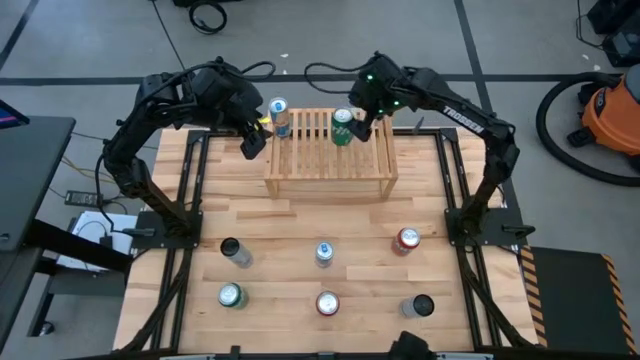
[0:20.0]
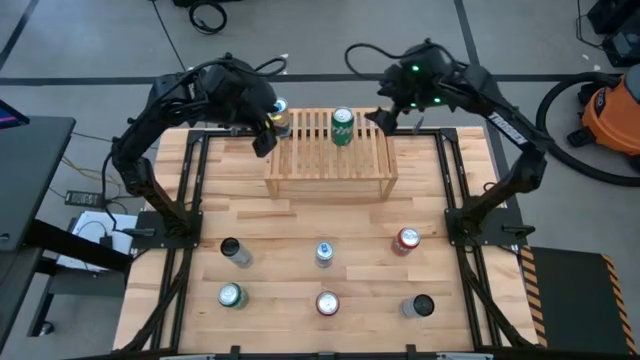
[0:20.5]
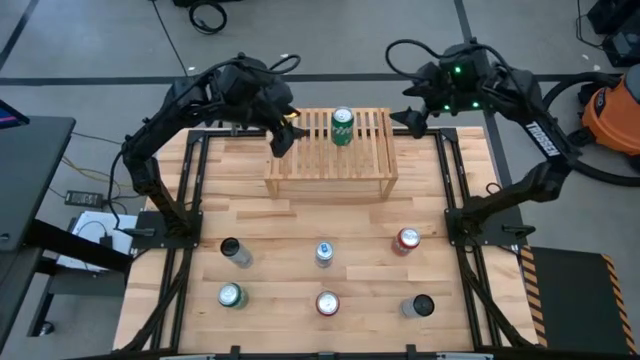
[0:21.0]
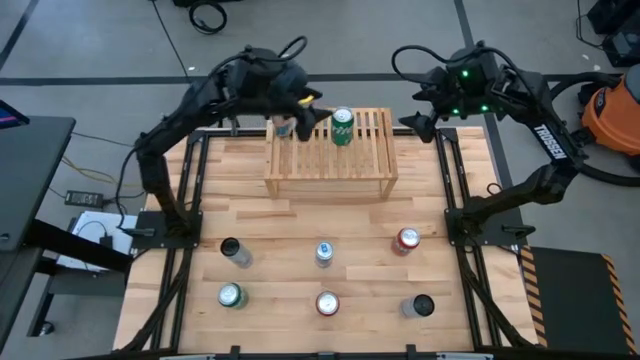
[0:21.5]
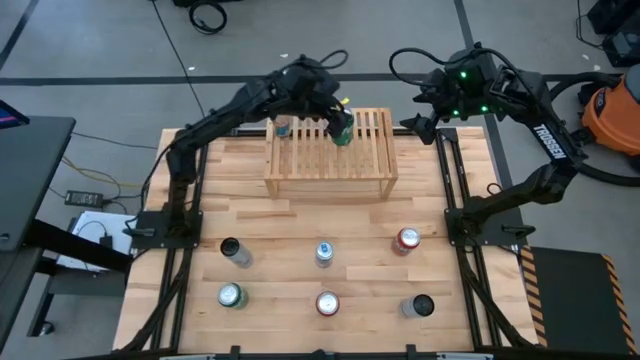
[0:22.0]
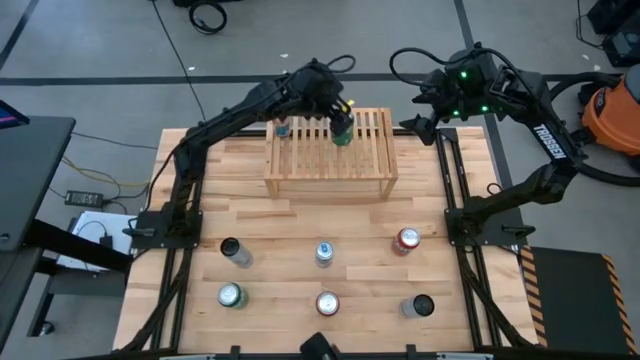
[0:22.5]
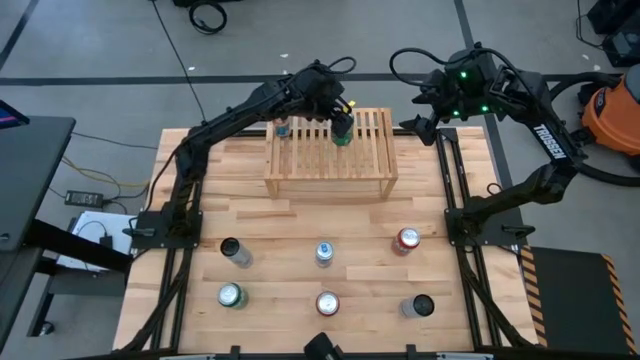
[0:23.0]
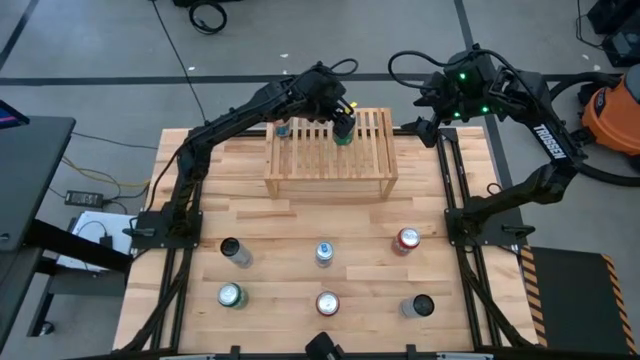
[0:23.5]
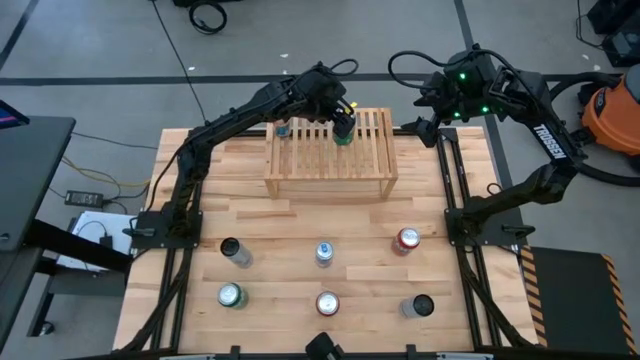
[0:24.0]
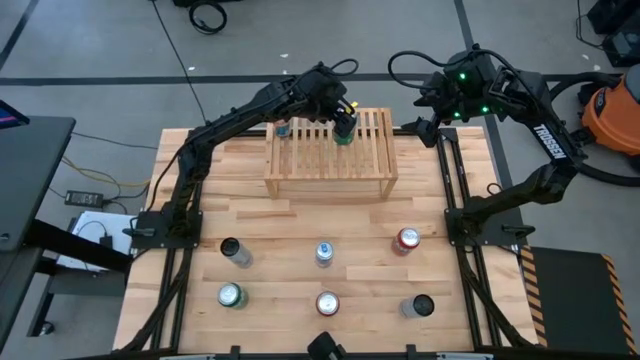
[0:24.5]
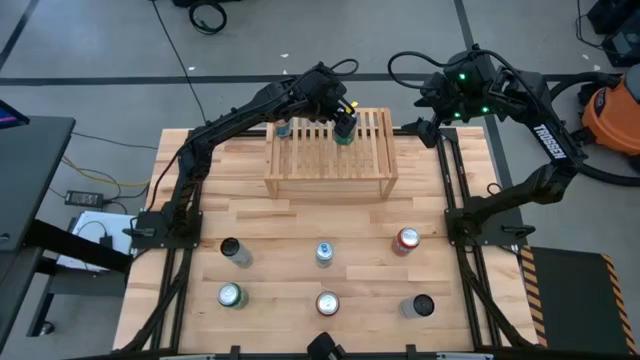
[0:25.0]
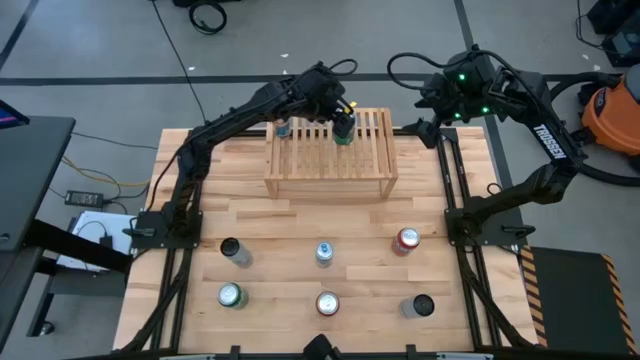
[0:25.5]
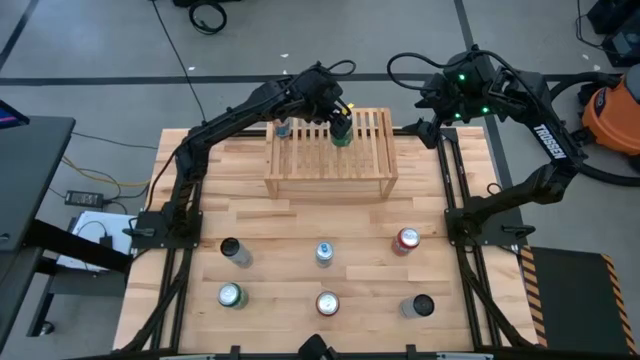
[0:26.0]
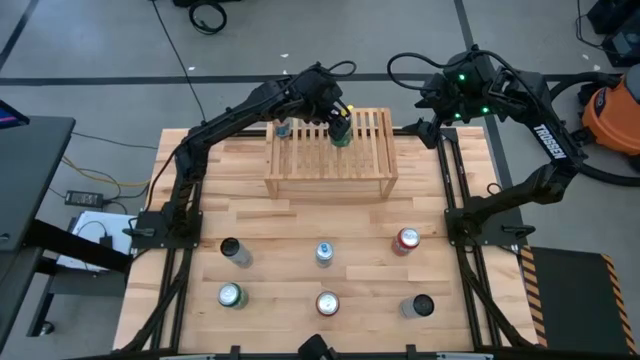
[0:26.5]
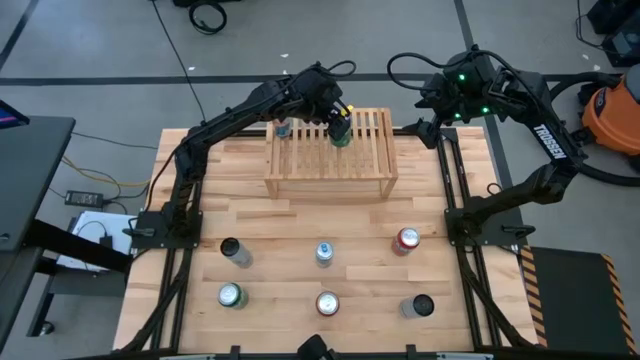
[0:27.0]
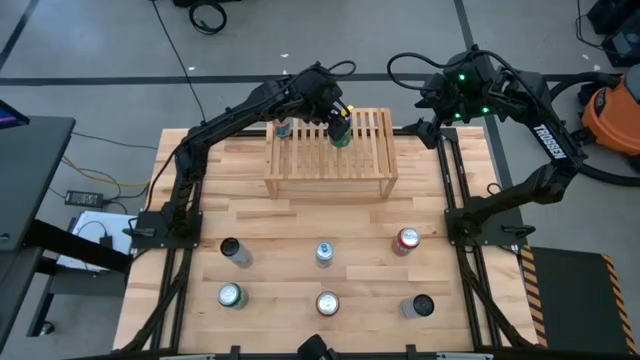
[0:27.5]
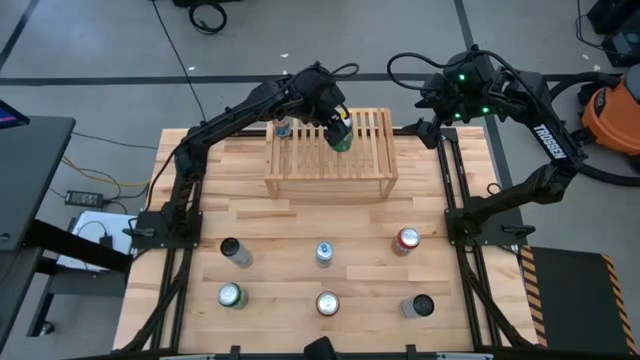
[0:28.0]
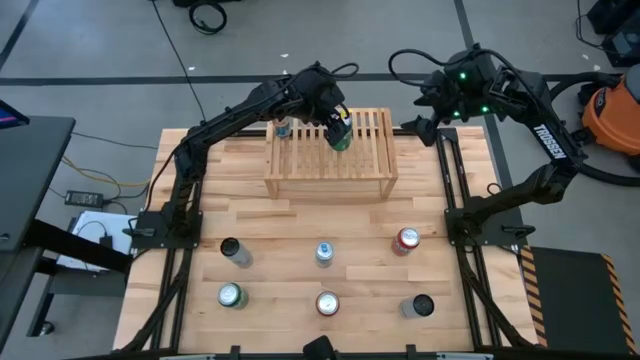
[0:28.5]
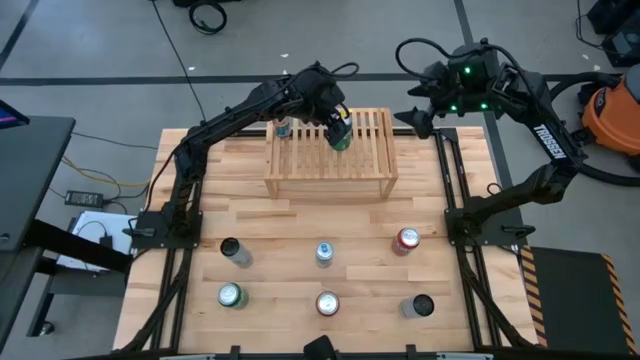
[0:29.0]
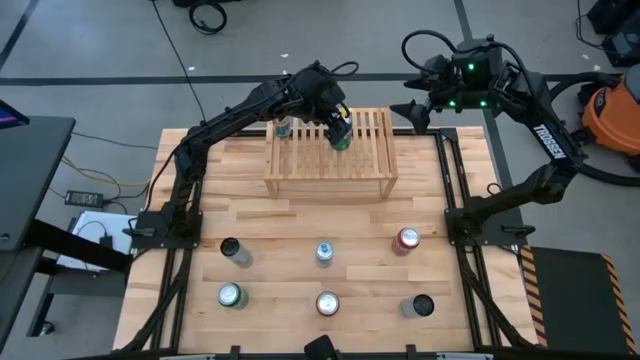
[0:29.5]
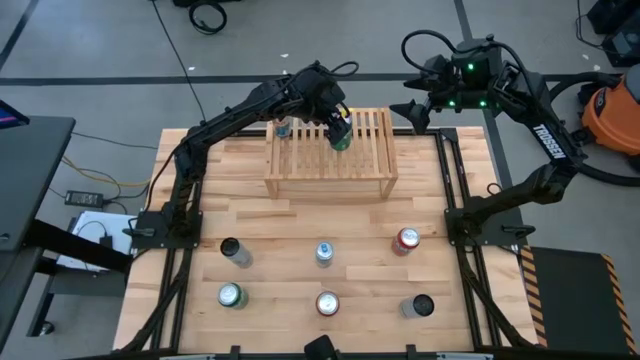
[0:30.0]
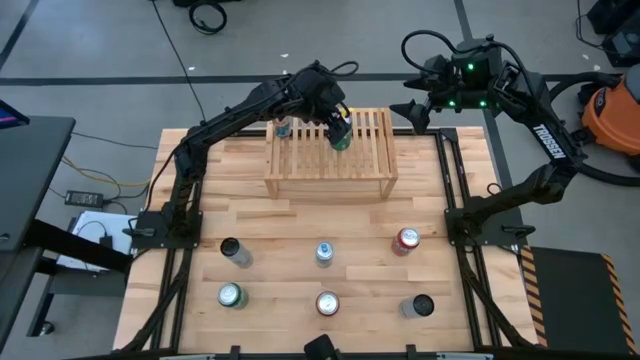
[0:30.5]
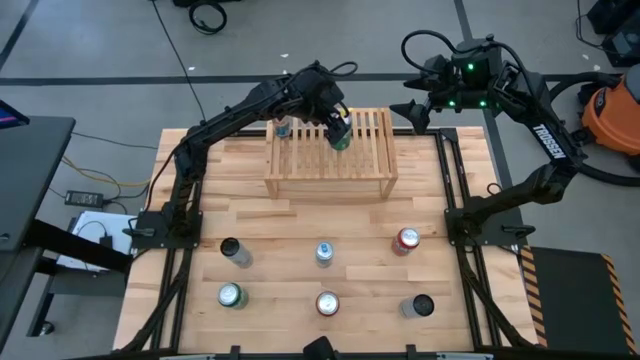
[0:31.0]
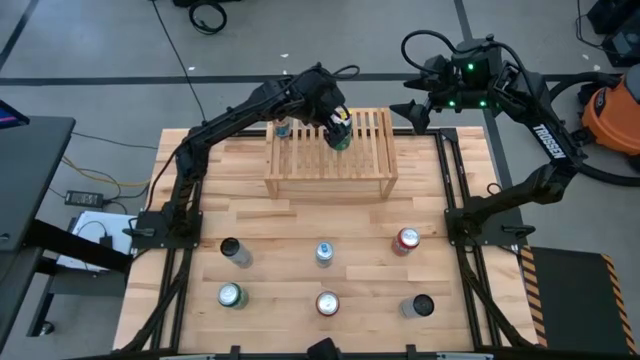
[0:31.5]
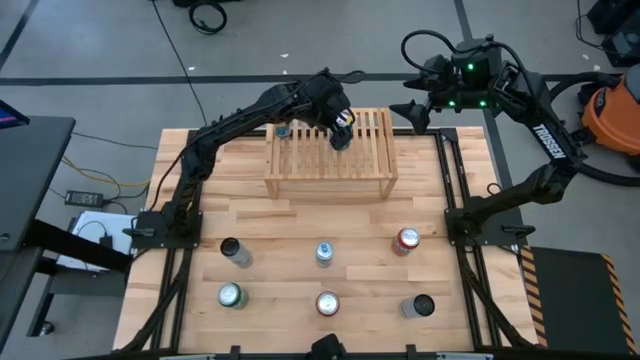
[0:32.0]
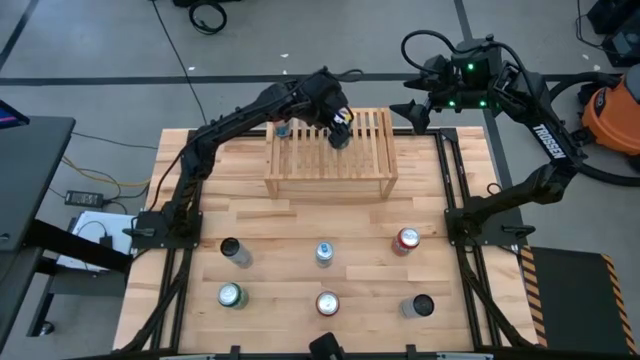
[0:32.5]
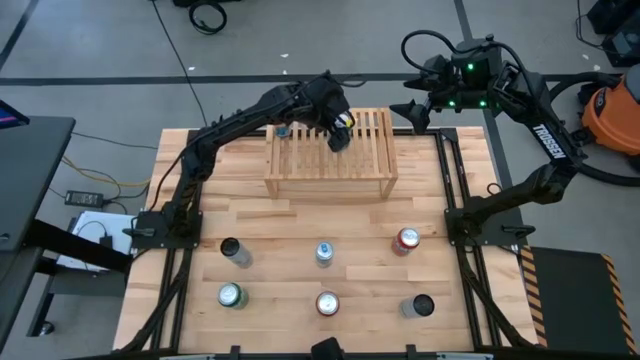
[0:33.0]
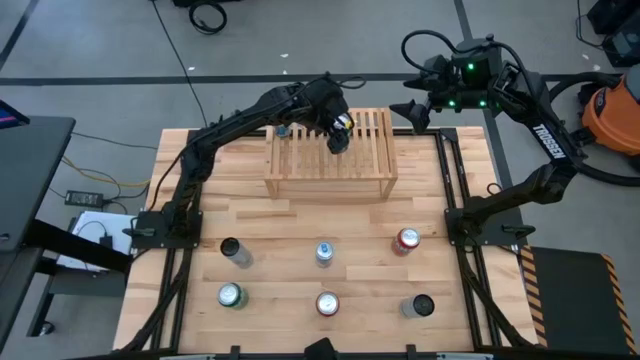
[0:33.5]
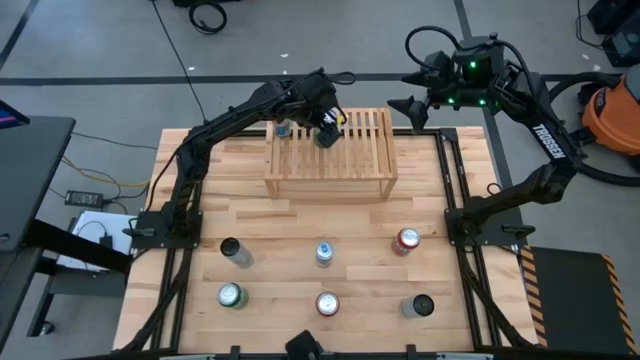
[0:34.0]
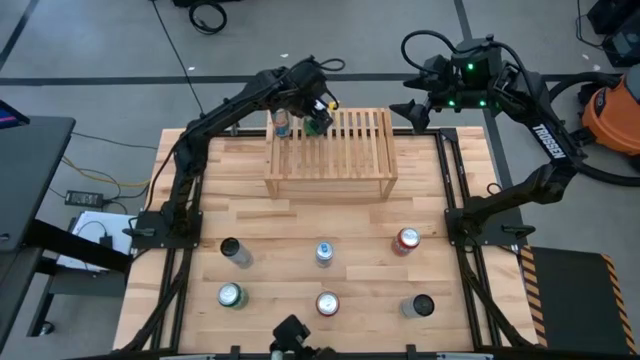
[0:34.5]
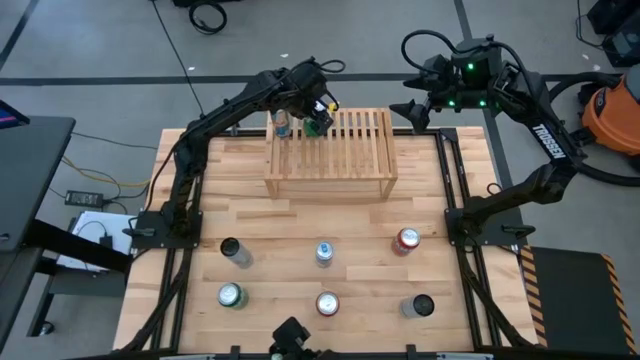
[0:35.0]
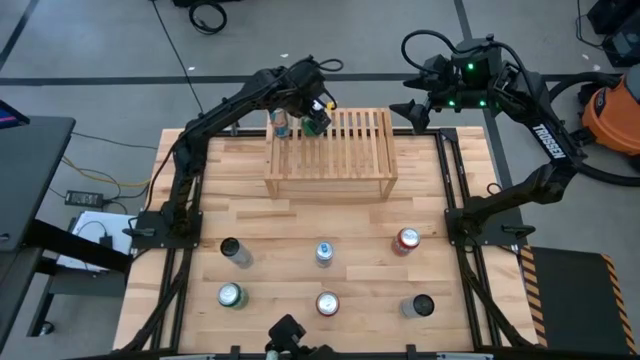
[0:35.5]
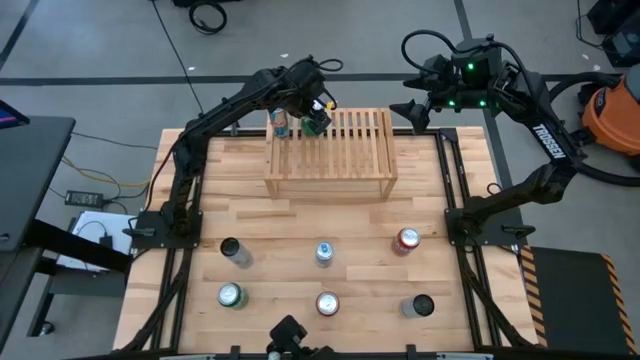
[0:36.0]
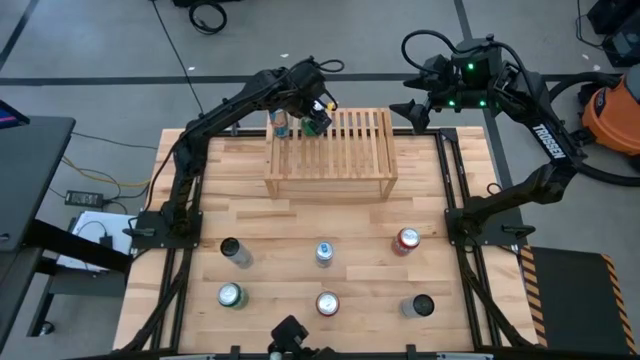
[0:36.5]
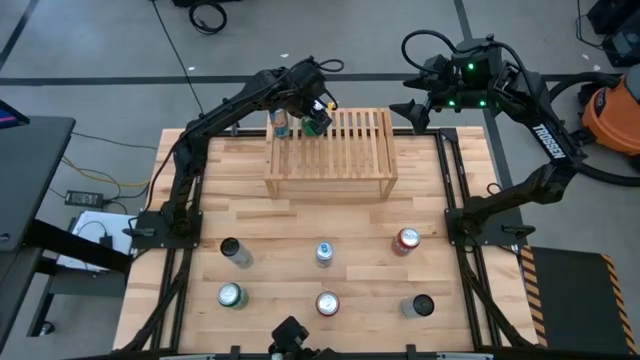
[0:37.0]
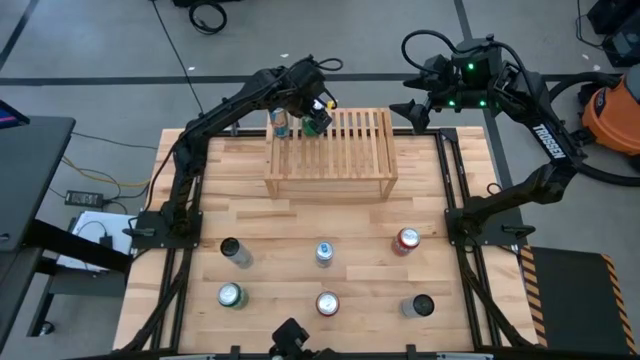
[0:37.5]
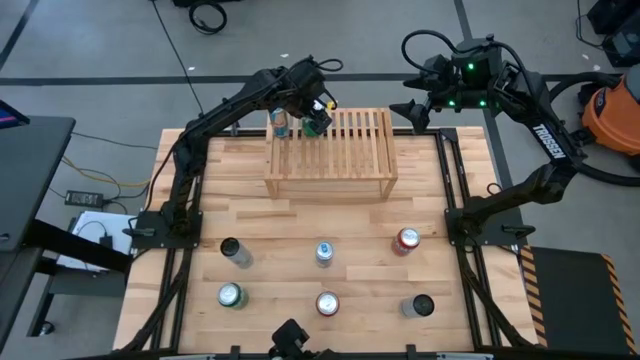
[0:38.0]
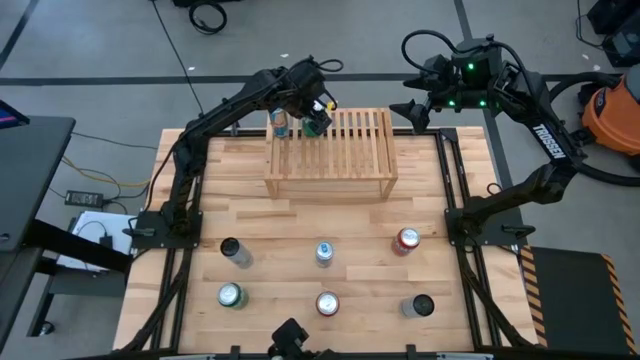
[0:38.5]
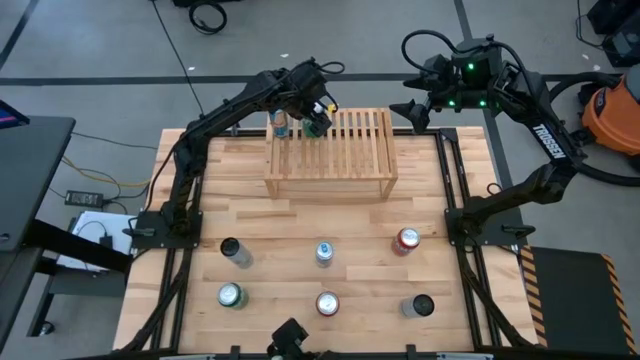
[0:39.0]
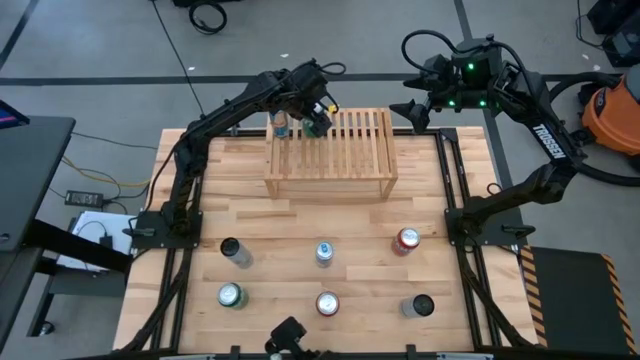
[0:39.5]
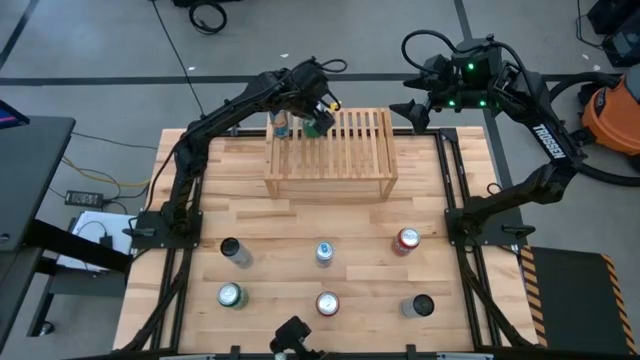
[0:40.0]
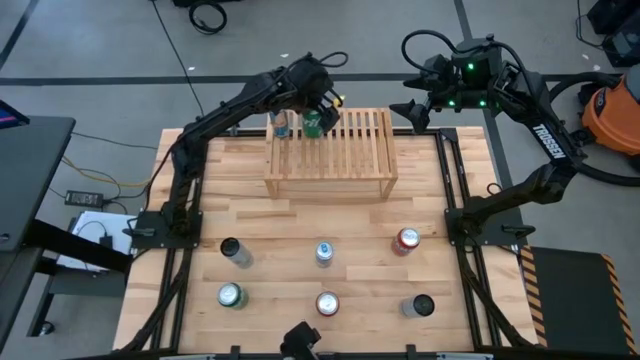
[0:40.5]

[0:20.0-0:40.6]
Task: Place canned beverage on shelf
Align the green soda can with the blue soda can on the shelf
